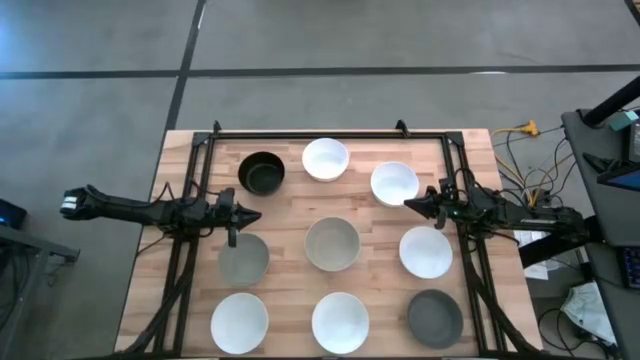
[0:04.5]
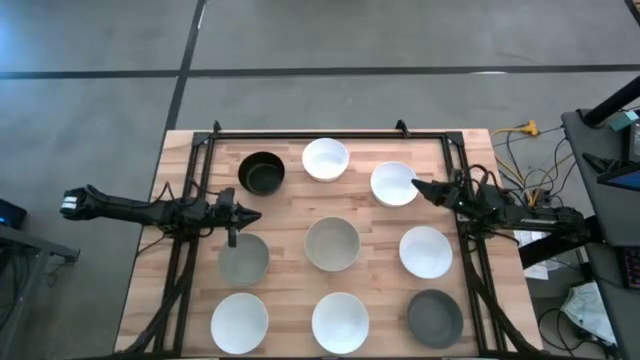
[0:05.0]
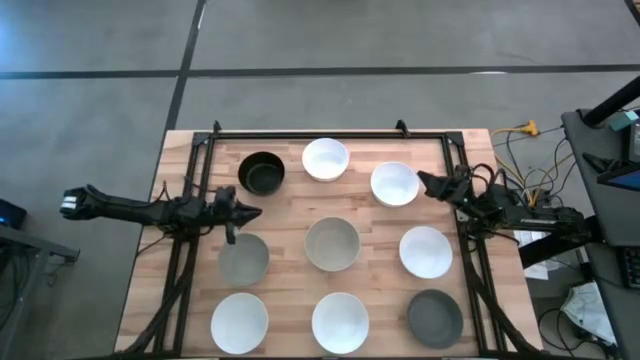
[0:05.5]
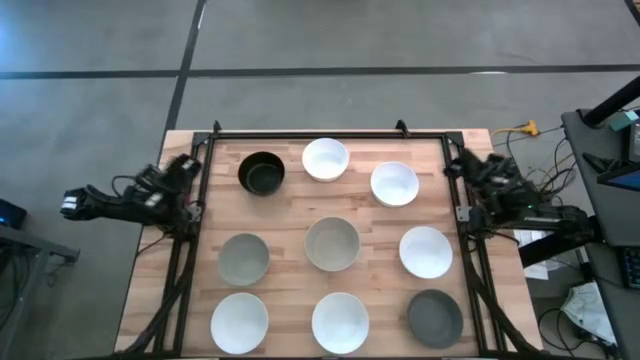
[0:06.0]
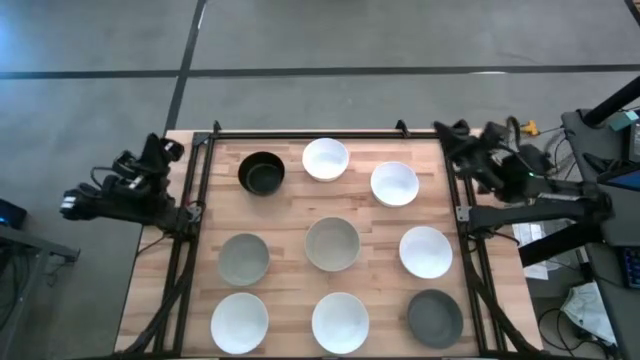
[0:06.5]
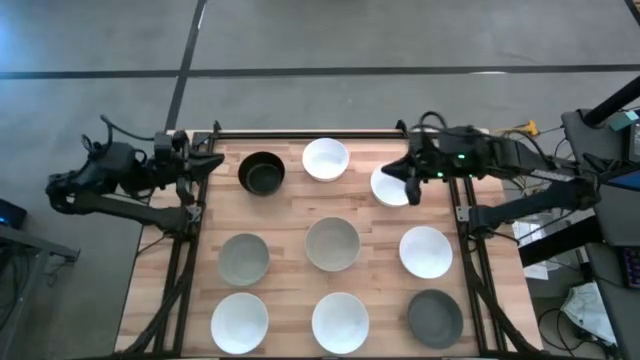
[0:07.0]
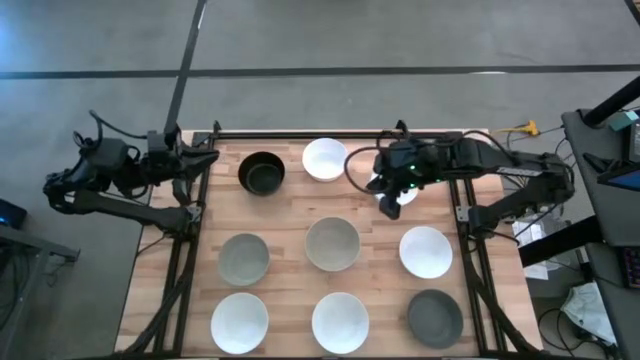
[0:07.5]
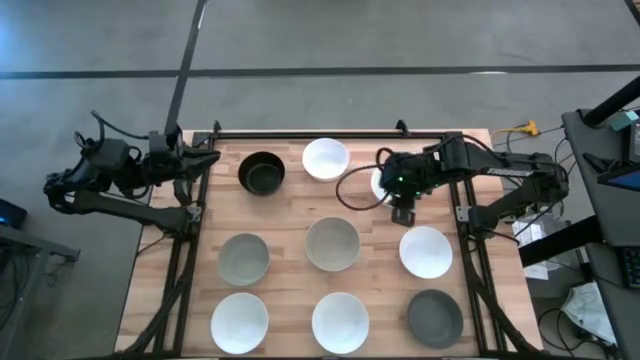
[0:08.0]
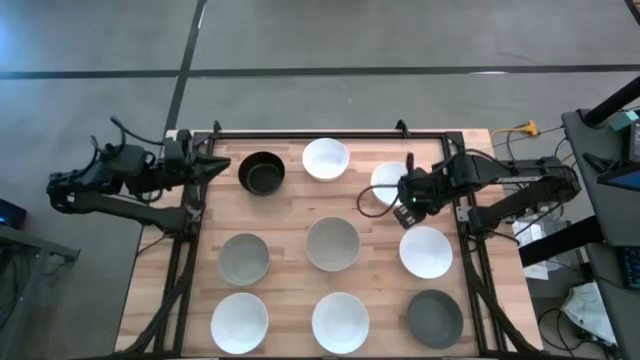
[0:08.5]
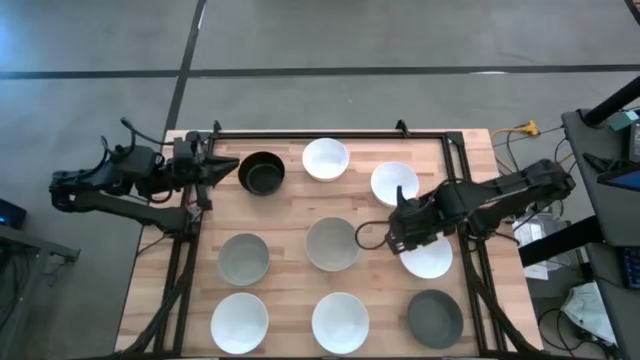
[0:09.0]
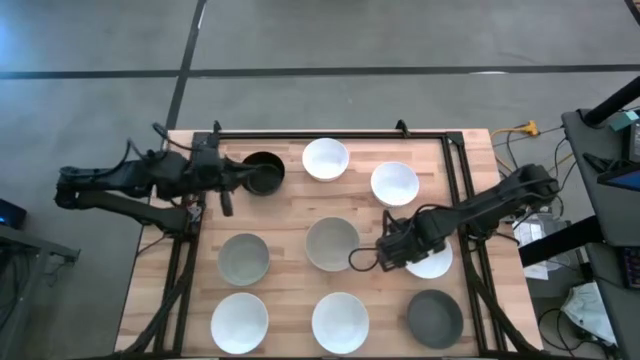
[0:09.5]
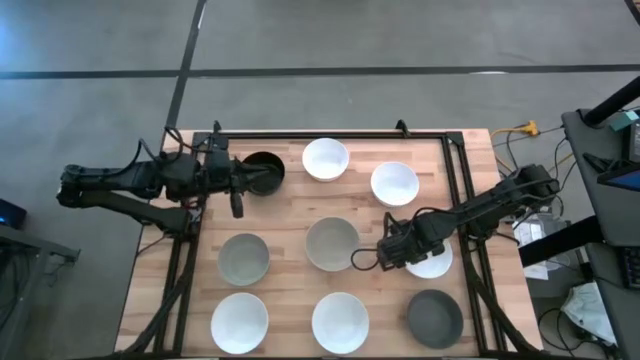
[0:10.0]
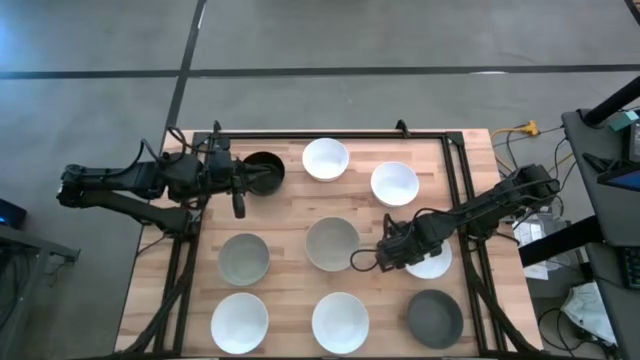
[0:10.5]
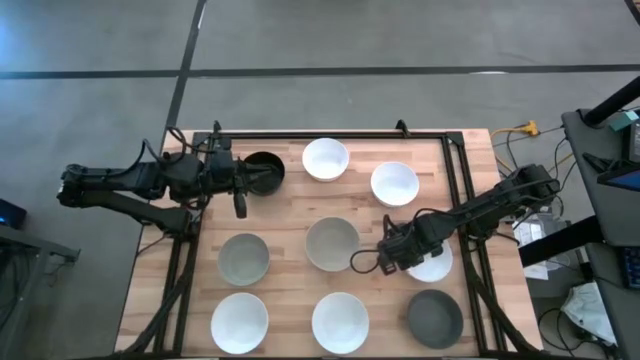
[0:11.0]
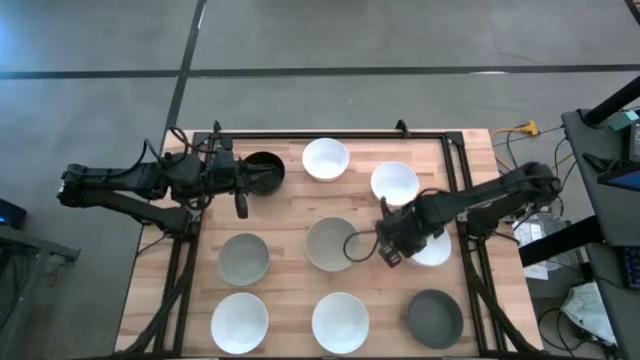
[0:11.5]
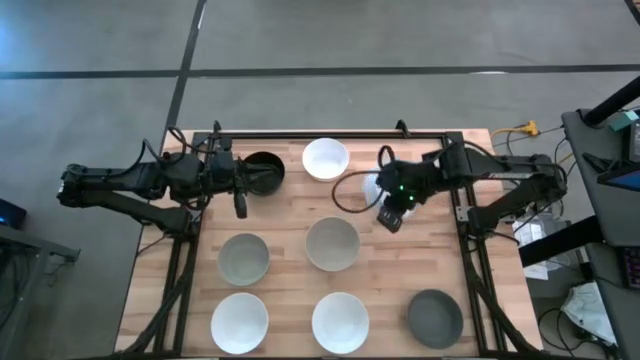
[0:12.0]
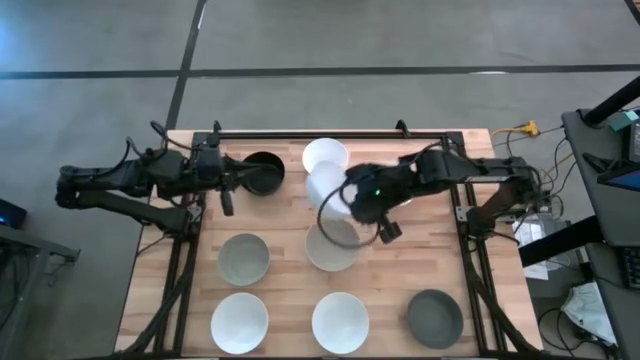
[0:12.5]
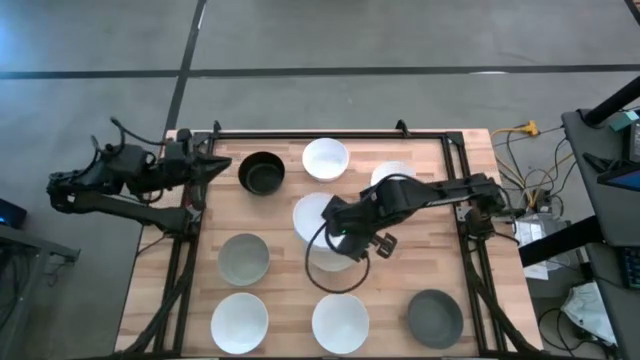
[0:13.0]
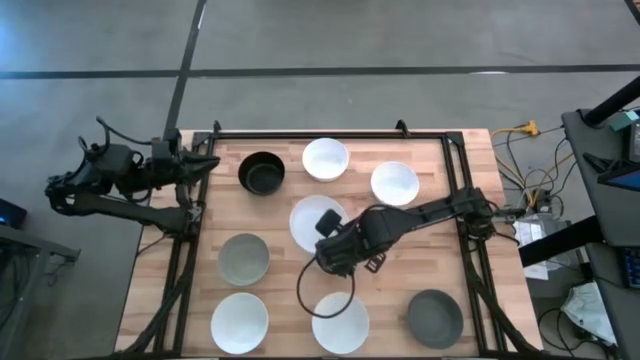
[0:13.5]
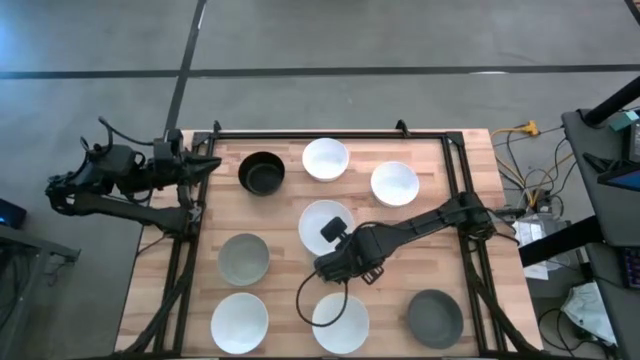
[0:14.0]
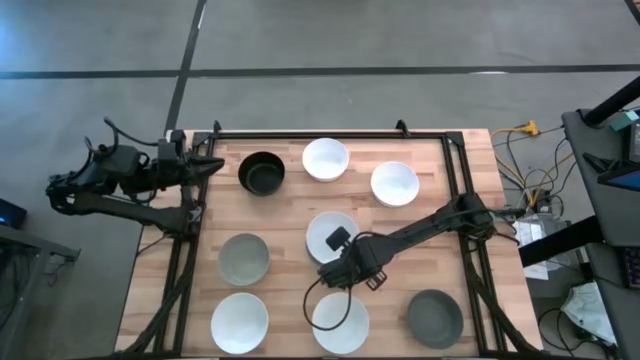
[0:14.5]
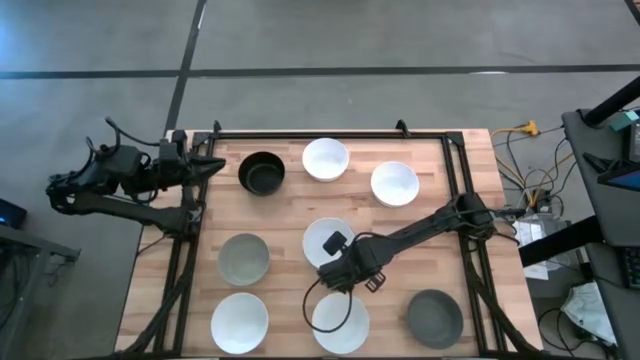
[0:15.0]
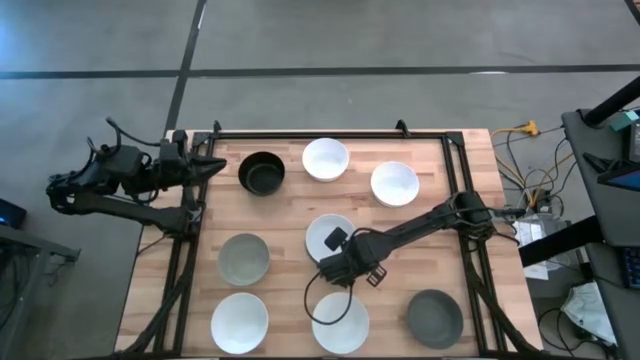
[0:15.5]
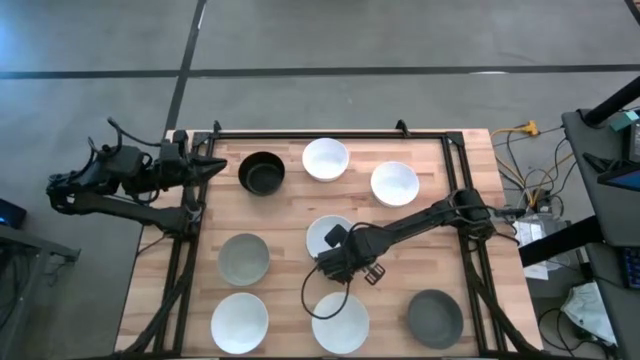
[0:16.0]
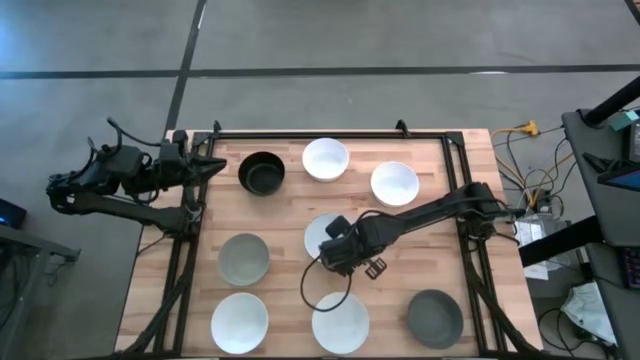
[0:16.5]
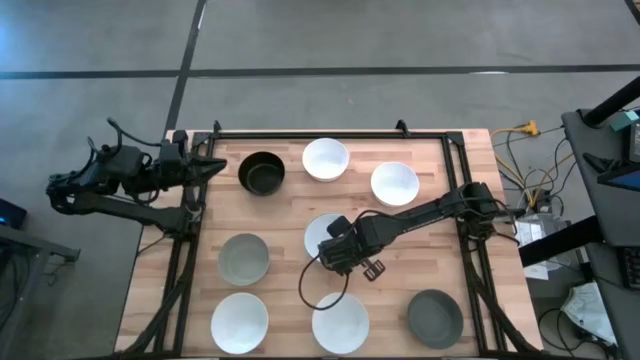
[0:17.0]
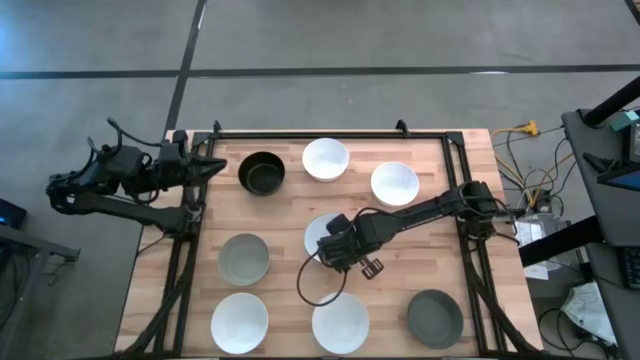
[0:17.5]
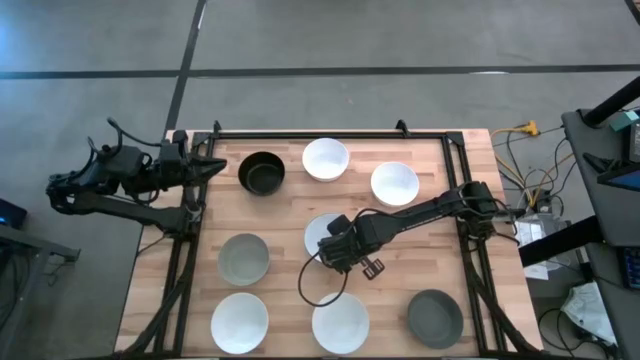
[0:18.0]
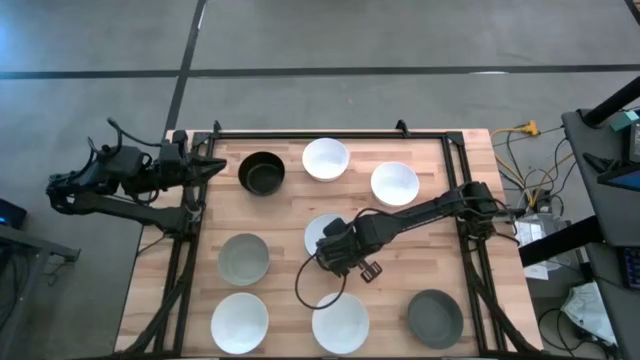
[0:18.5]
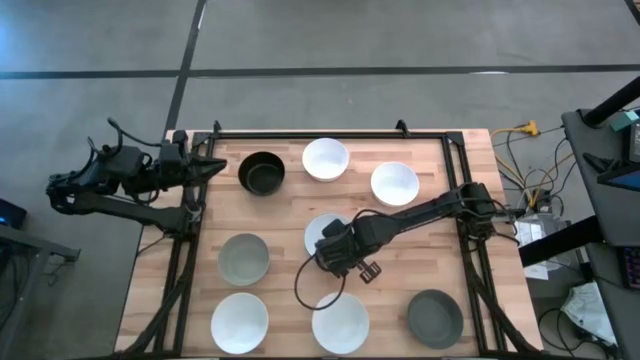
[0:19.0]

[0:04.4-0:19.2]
Task: Nest bowls inside each other
Stack the white bowl on the center light gray bowl

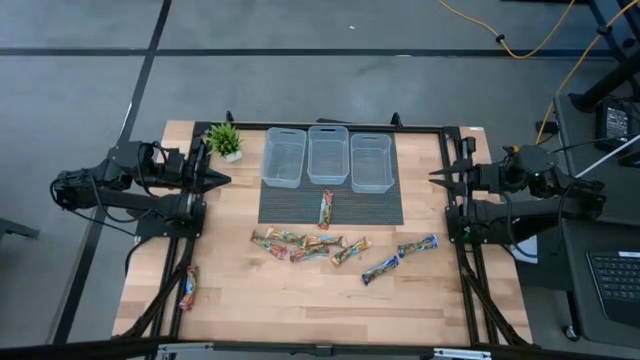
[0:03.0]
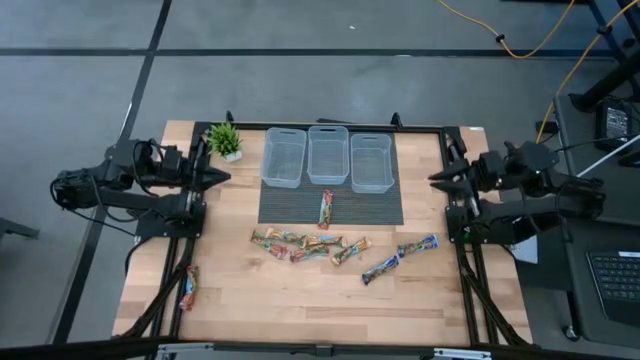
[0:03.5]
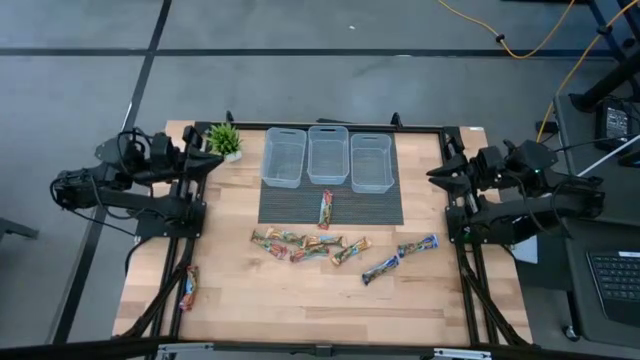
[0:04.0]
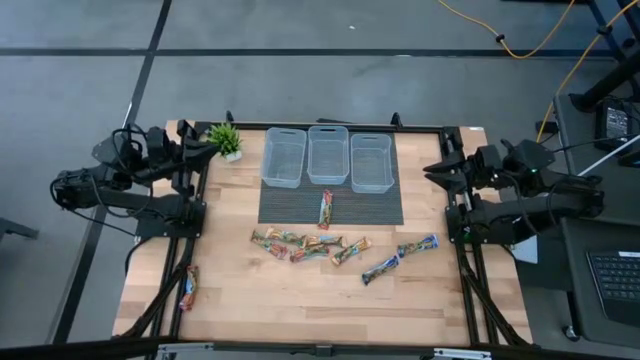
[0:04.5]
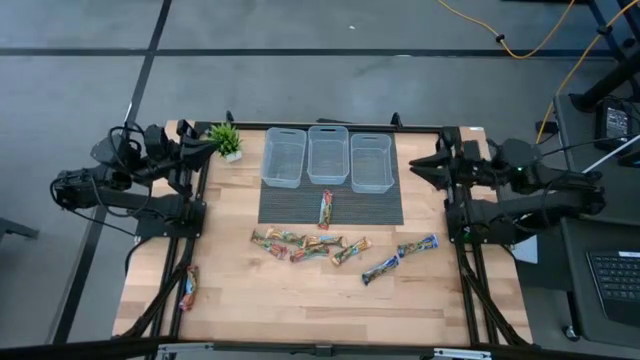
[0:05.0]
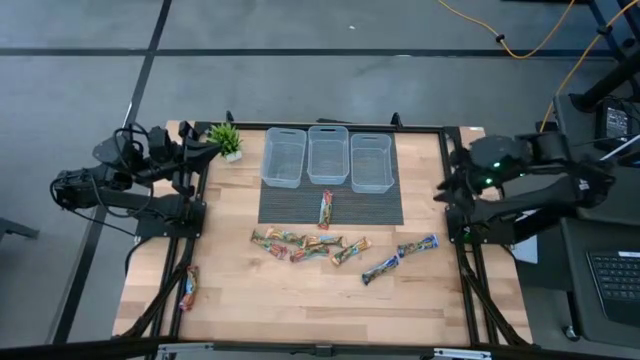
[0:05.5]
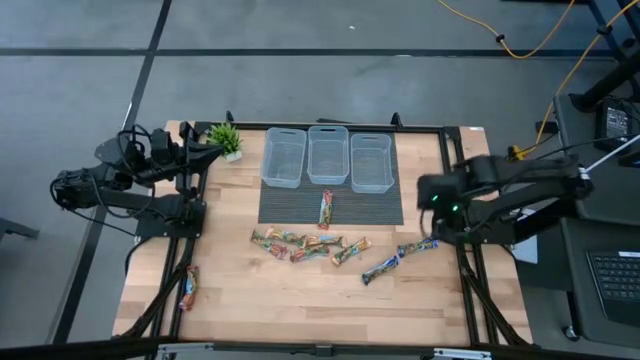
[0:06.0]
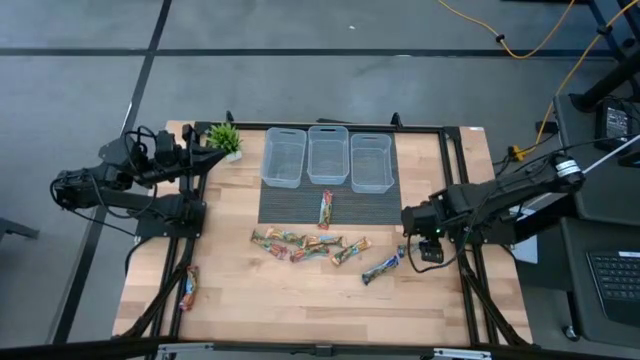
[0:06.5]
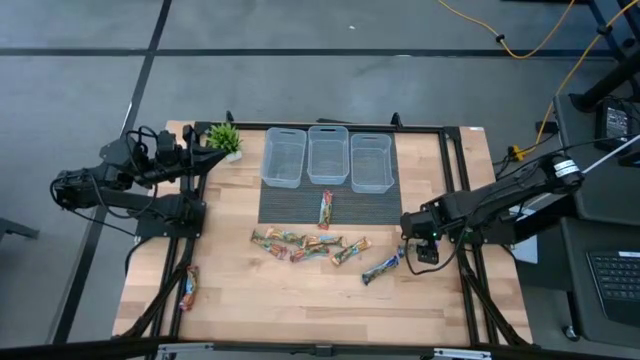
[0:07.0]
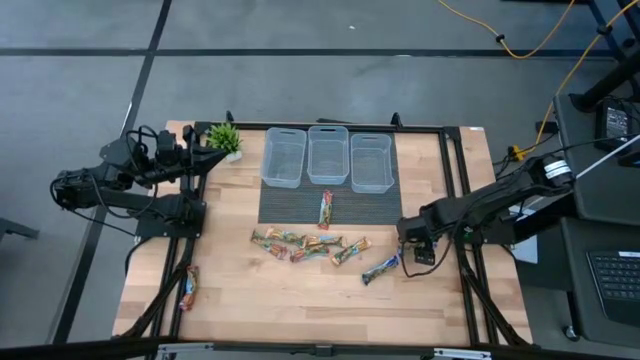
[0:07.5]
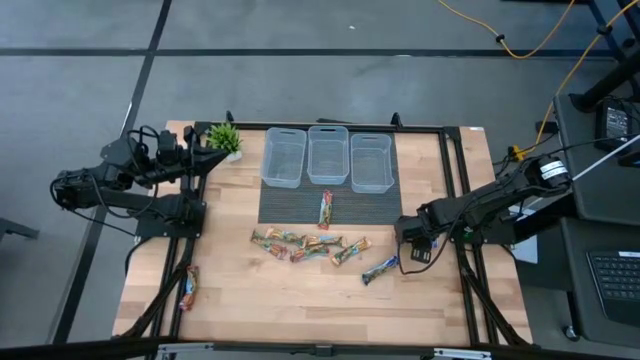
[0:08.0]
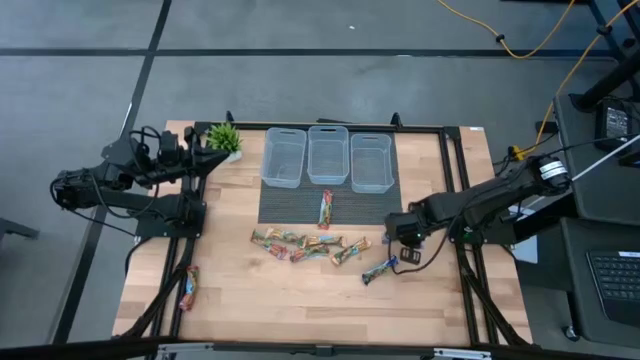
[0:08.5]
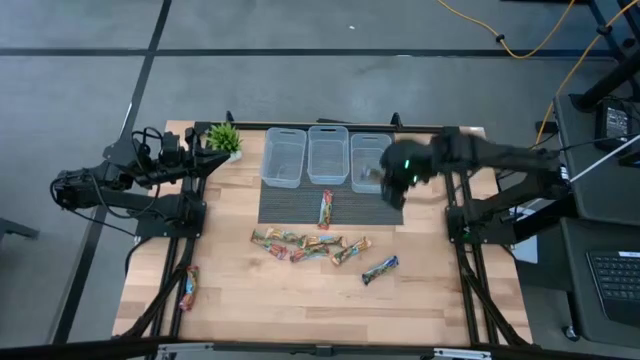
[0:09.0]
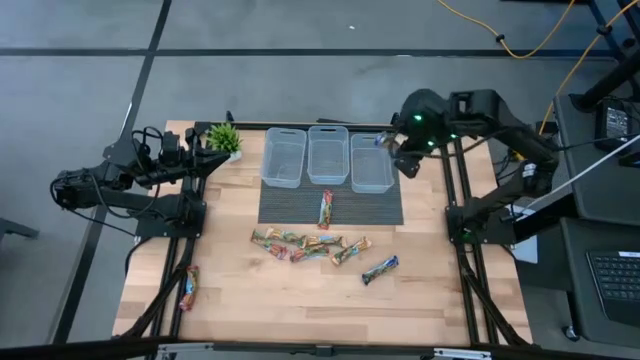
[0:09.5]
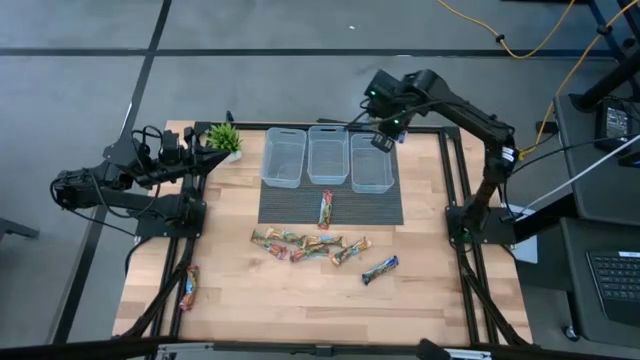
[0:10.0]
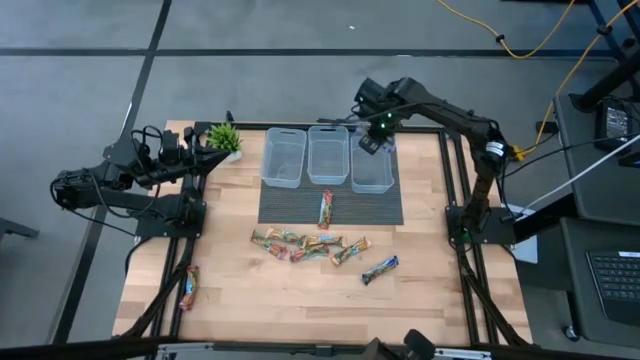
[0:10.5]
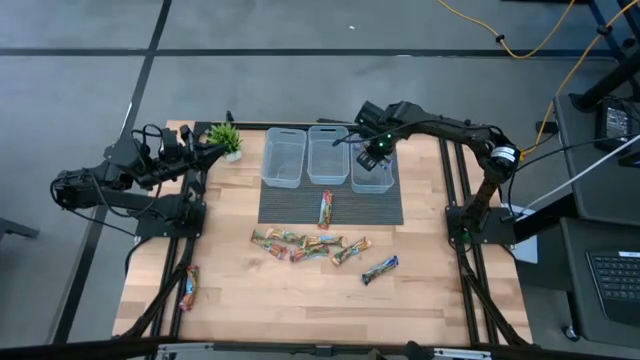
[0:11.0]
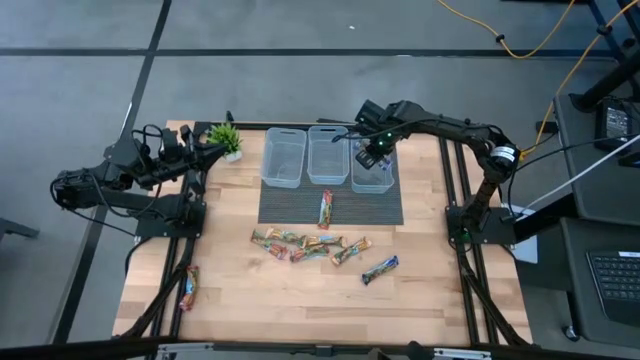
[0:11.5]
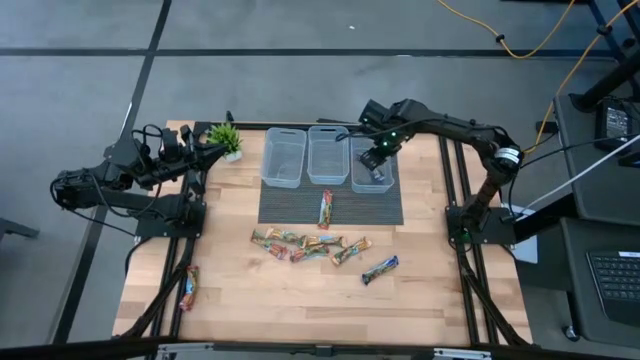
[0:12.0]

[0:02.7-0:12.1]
Task: Pick and place Granola Bars by type
Put the left blue snack bar into the right transparent bin
